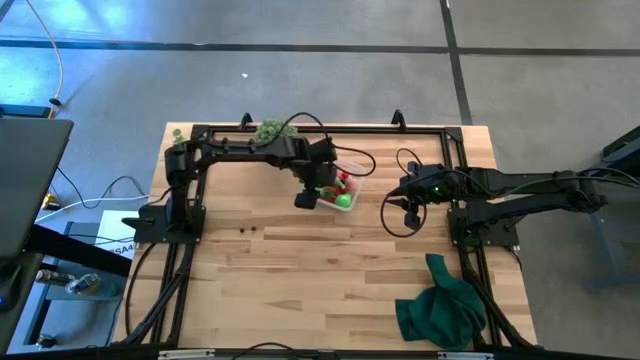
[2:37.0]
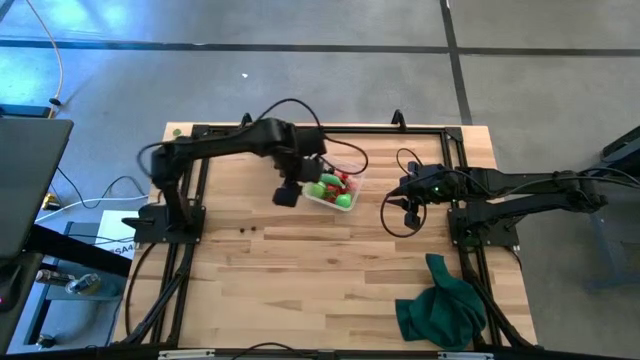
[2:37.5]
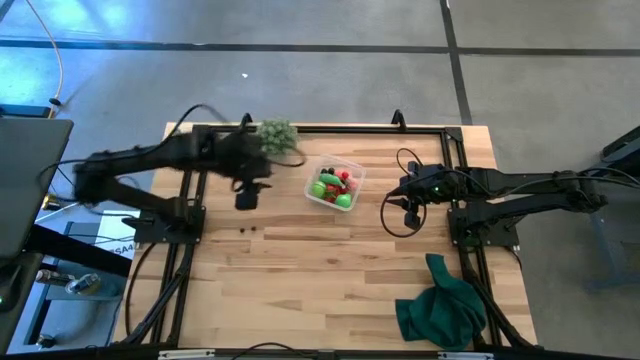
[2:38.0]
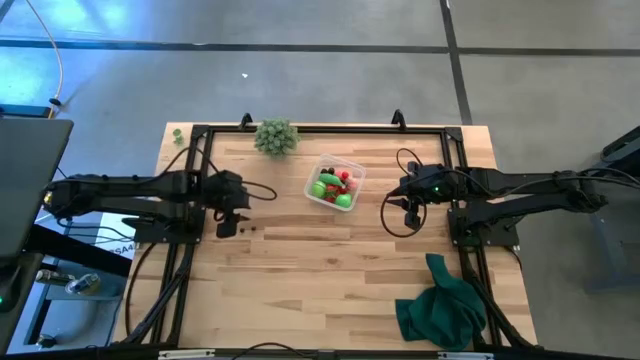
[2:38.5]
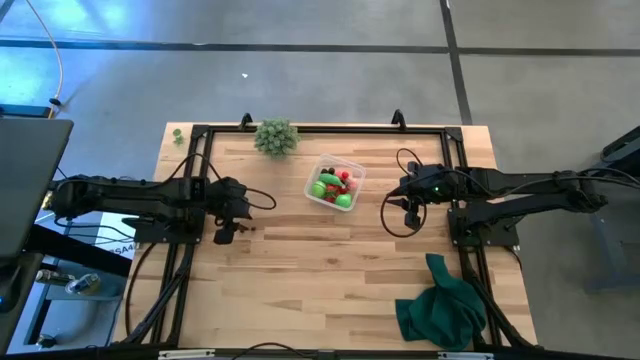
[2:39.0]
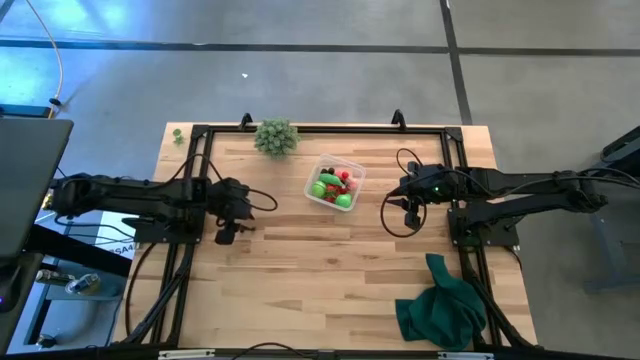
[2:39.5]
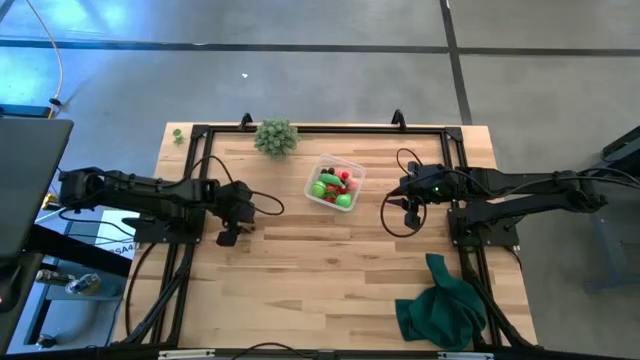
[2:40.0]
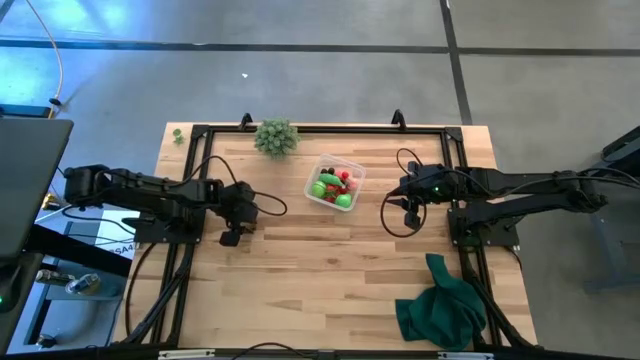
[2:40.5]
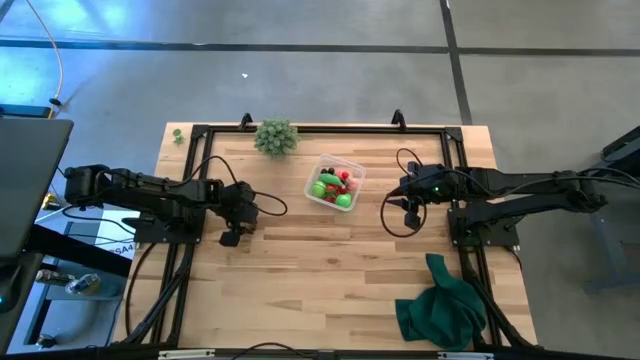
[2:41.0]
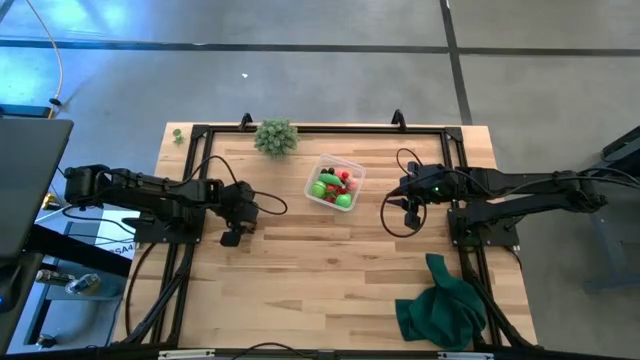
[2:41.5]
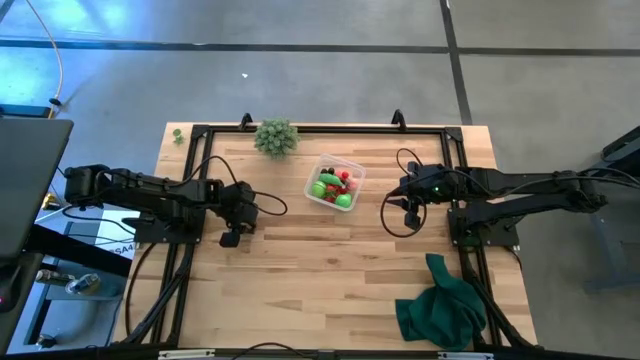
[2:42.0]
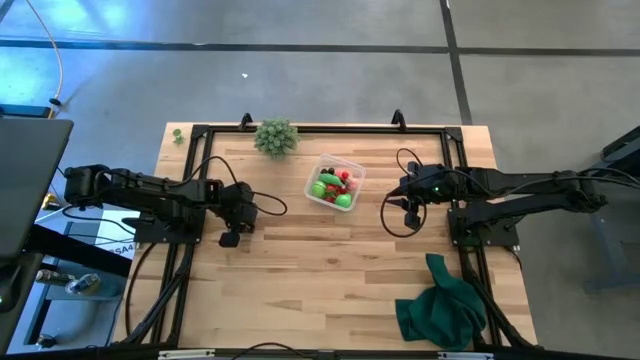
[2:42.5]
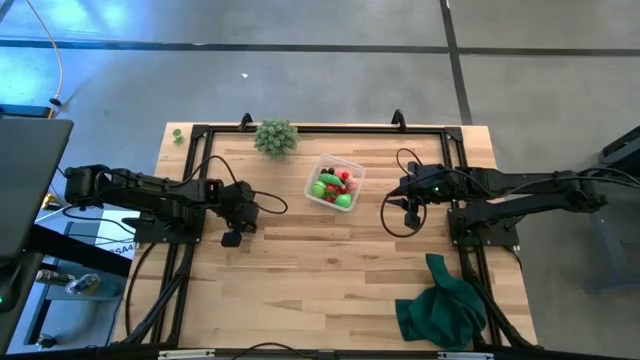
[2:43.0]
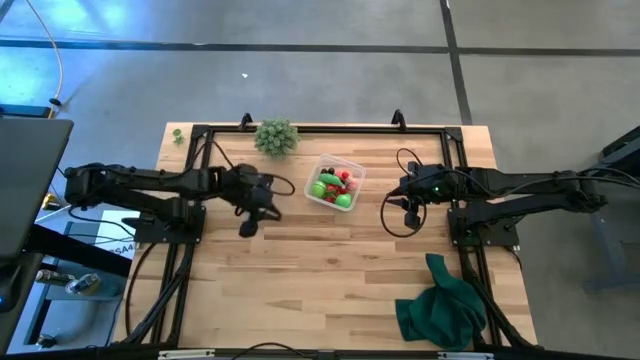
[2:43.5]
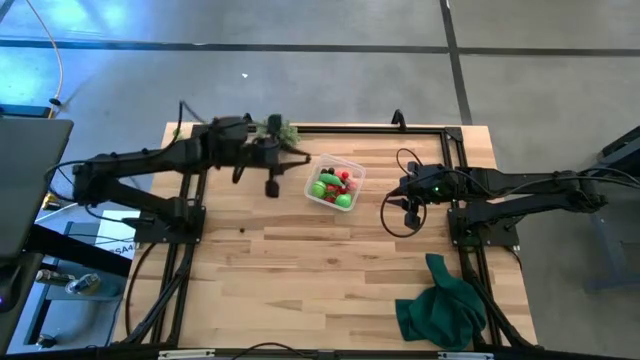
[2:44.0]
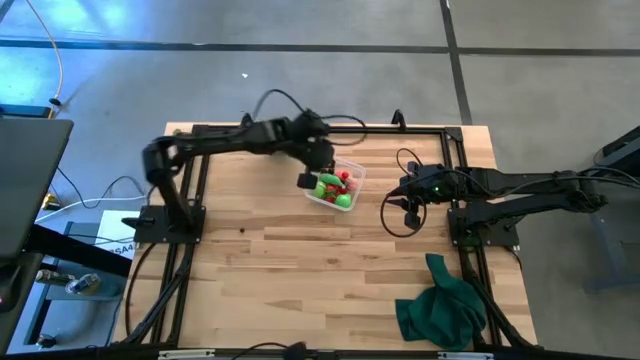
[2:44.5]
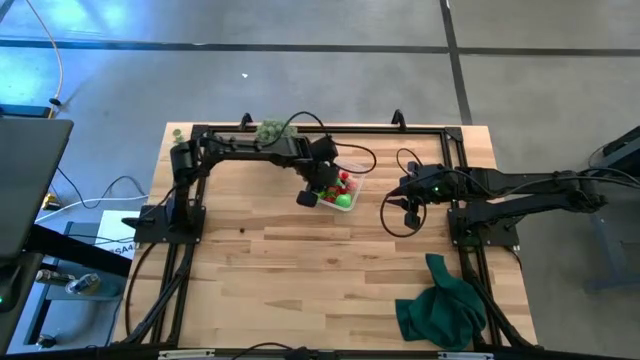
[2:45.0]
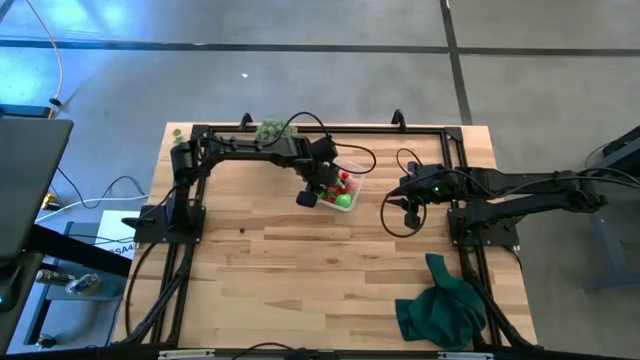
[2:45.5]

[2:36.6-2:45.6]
Task: Pick and placing Produce into tupperware
Put the blueberry into the transparent container

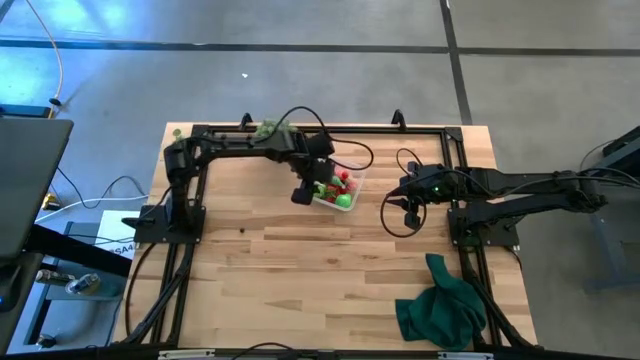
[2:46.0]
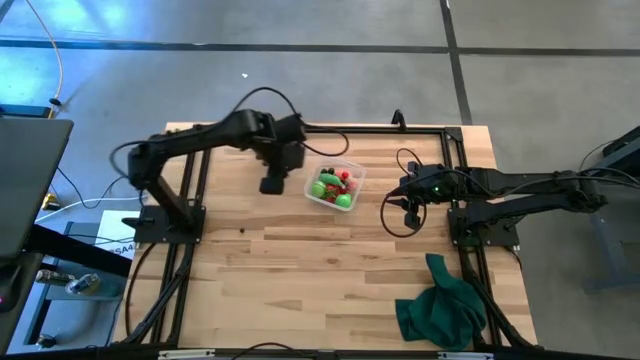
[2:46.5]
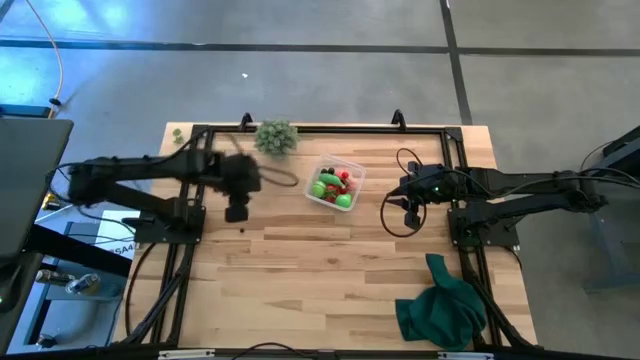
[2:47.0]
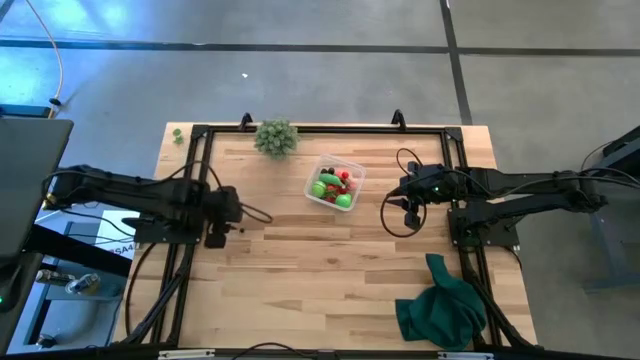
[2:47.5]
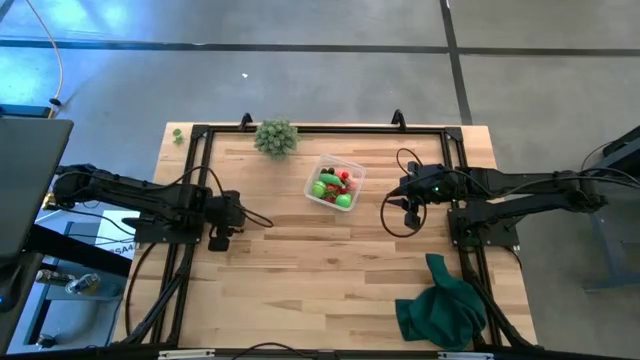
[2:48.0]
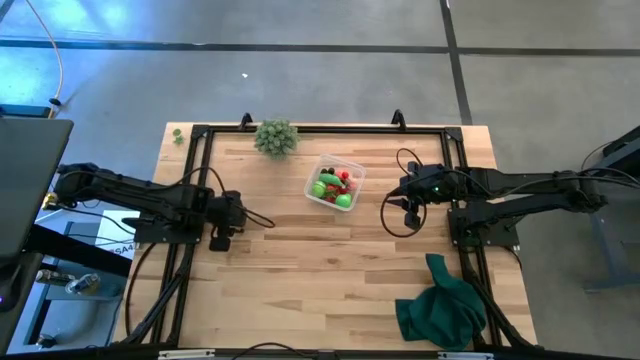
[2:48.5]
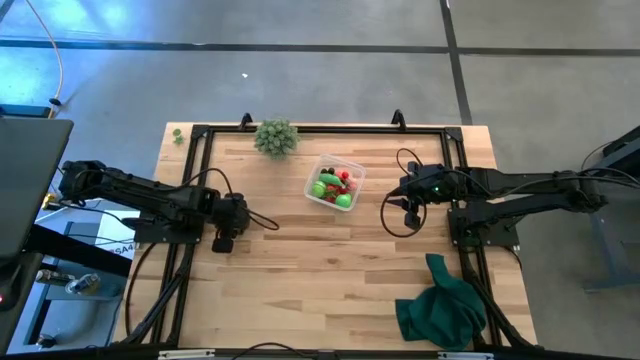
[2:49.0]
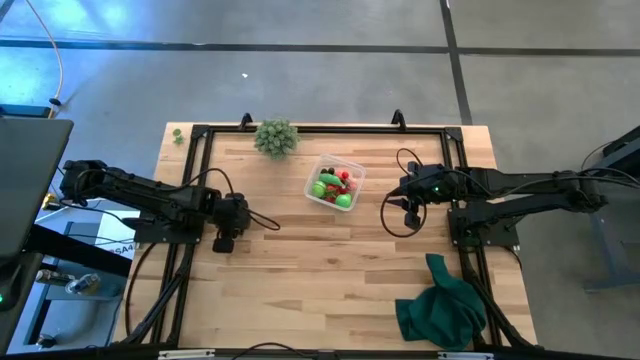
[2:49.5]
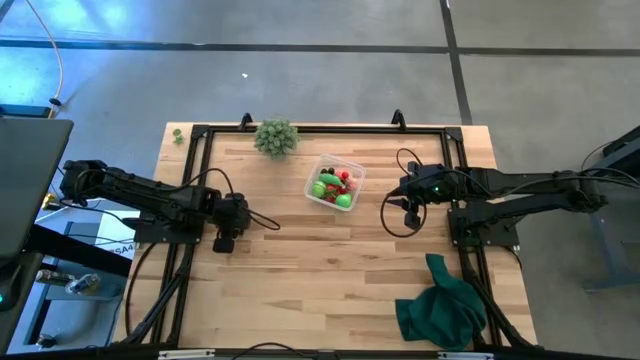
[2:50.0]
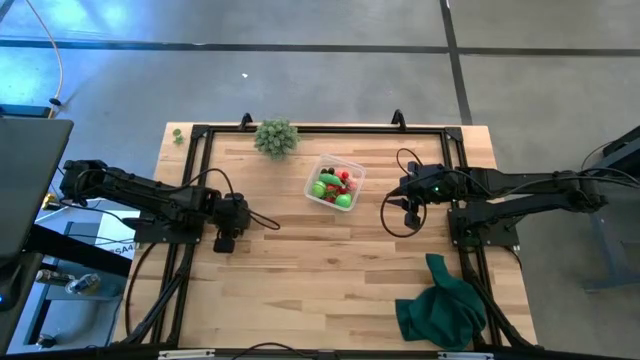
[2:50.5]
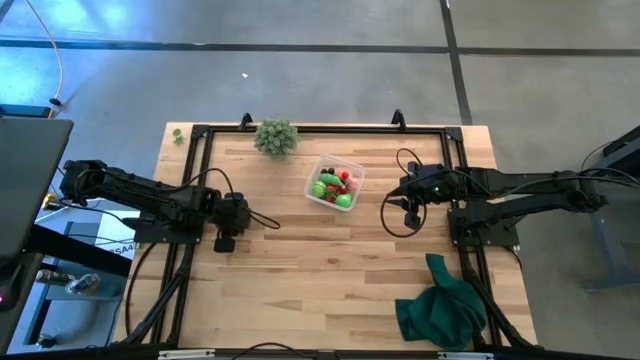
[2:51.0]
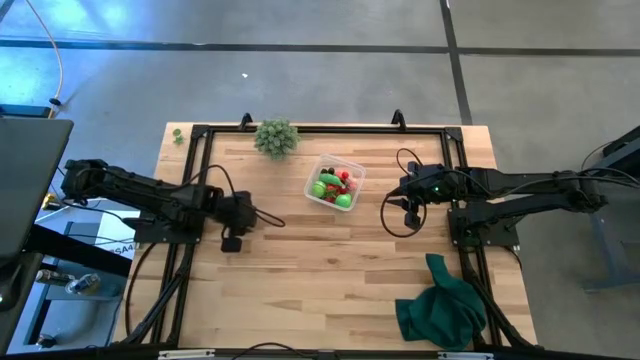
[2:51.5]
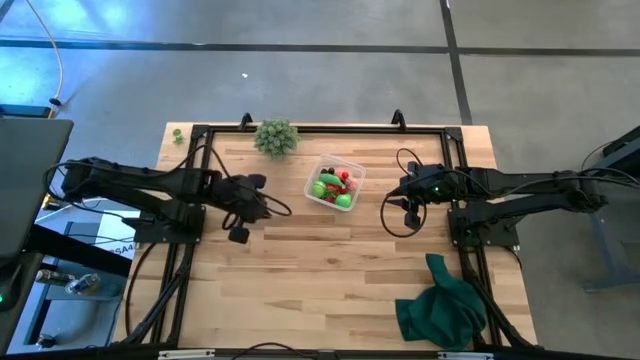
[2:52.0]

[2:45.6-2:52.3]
Put the blueberry into the transparent container

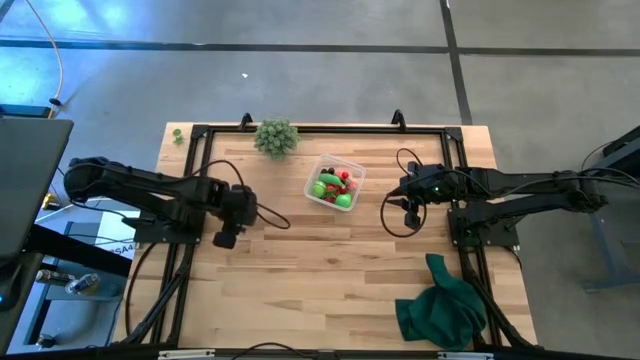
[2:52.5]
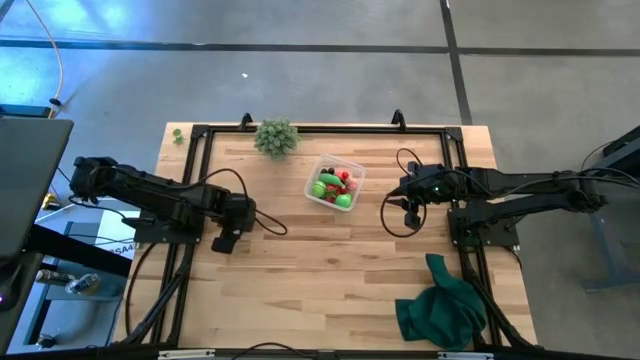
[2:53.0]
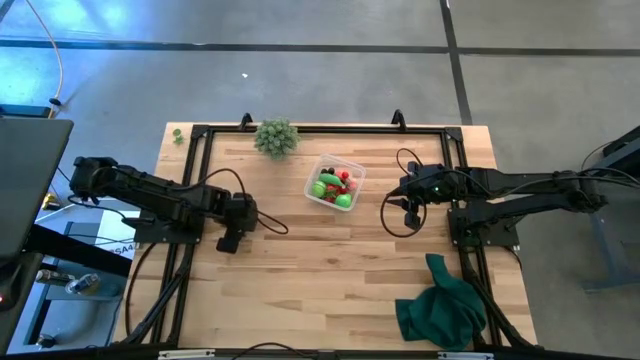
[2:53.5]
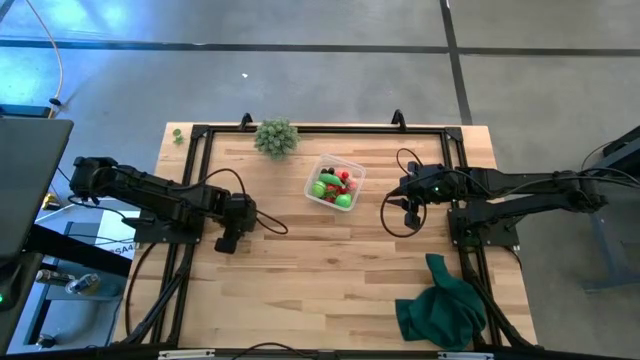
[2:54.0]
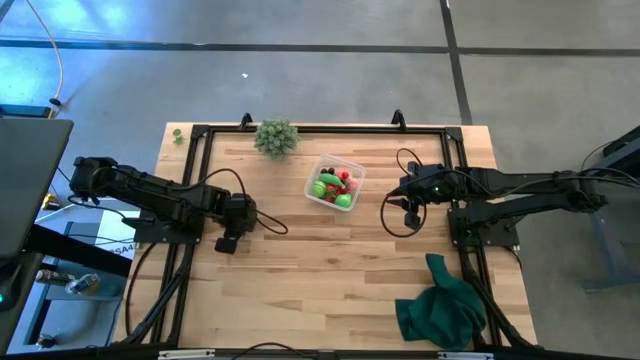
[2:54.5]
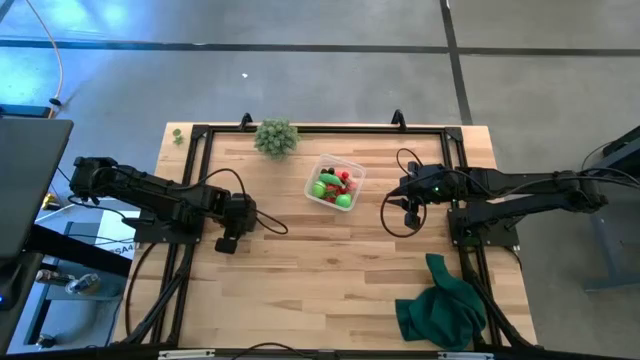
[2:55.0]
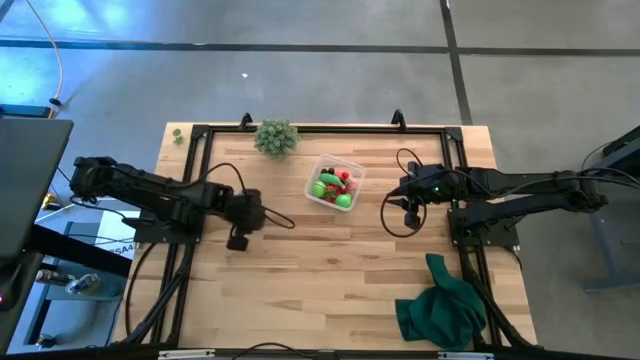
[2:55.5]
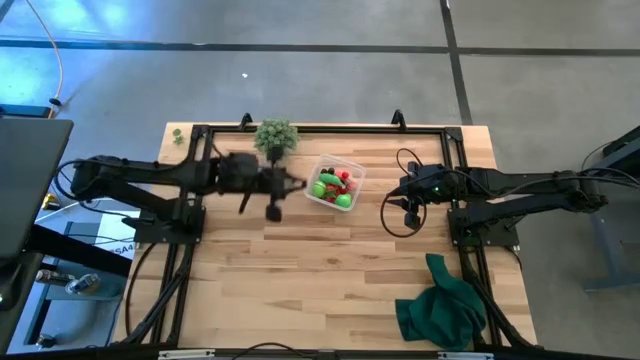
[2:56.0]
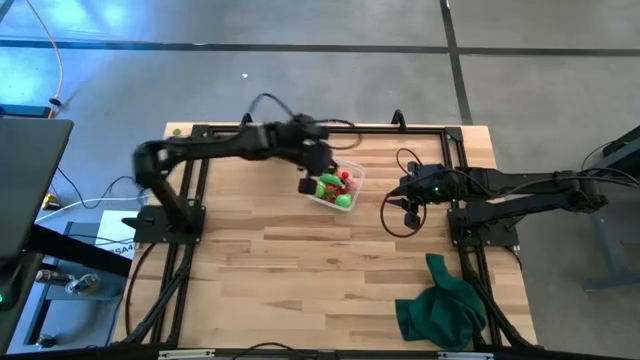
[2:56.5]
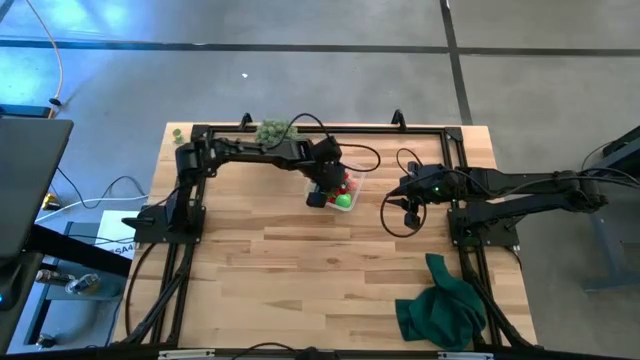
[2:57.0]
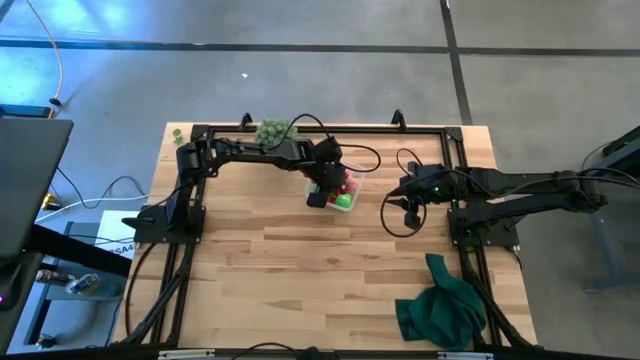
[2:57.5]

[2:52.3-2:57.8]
Put the blueberry into the transparent container
